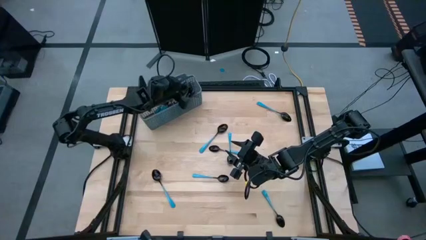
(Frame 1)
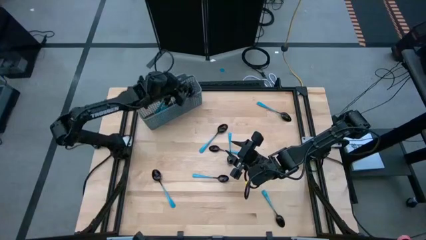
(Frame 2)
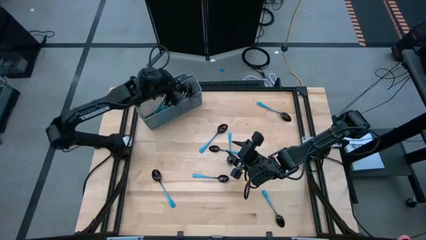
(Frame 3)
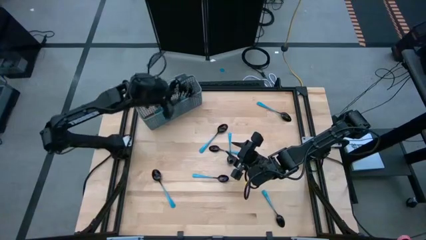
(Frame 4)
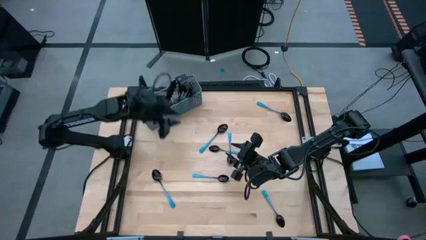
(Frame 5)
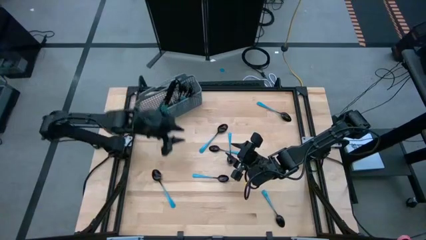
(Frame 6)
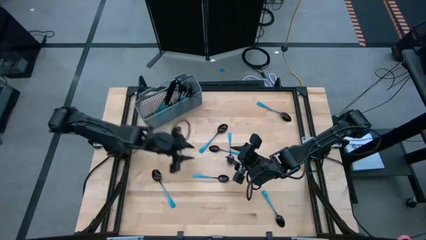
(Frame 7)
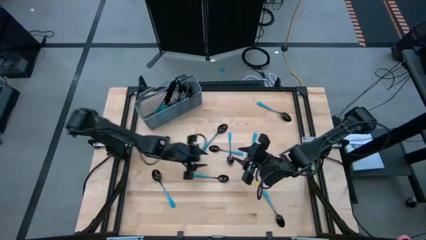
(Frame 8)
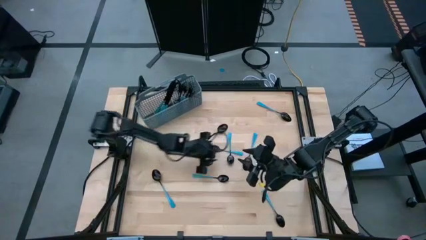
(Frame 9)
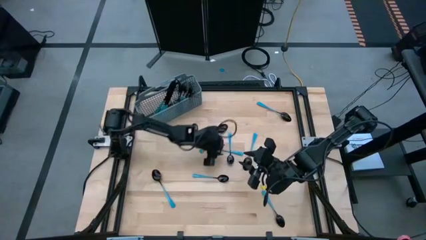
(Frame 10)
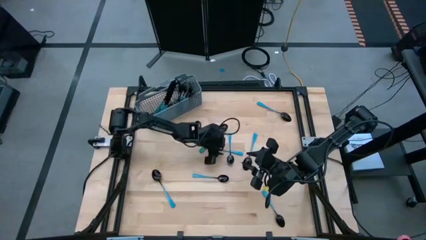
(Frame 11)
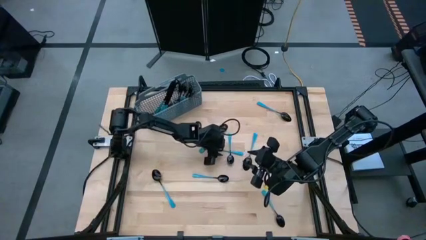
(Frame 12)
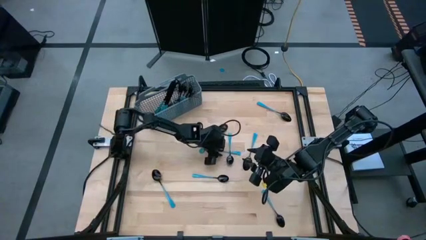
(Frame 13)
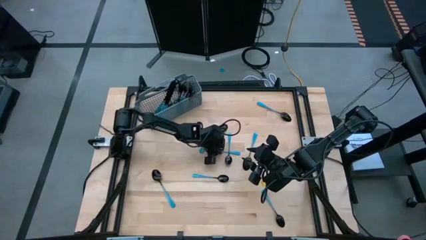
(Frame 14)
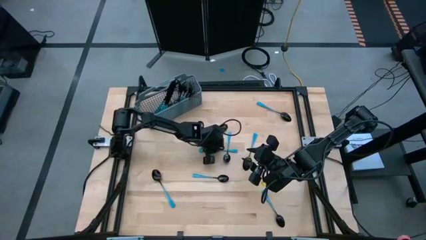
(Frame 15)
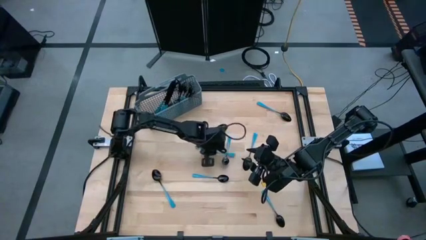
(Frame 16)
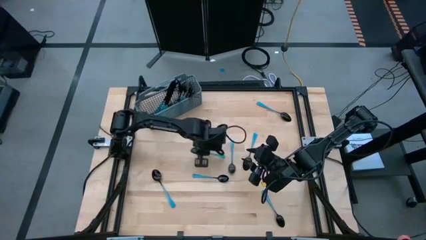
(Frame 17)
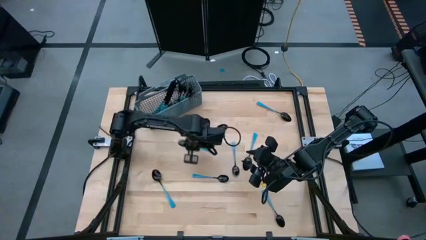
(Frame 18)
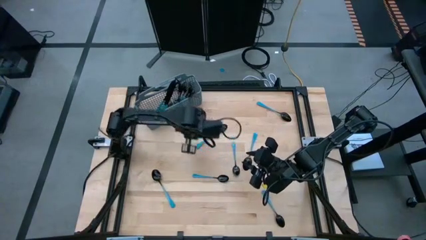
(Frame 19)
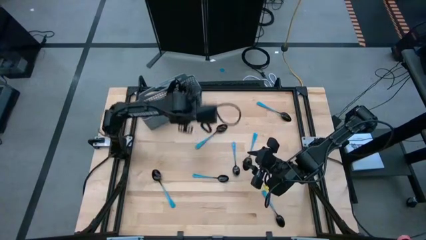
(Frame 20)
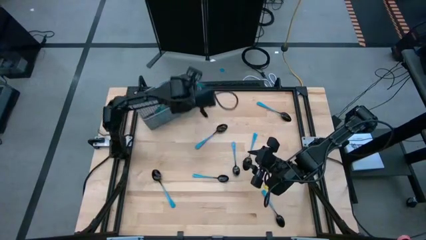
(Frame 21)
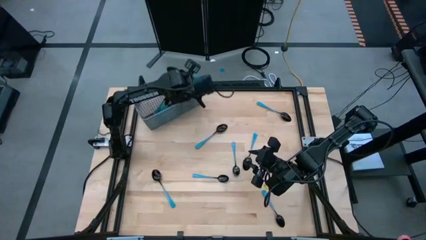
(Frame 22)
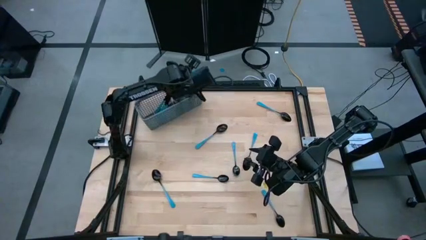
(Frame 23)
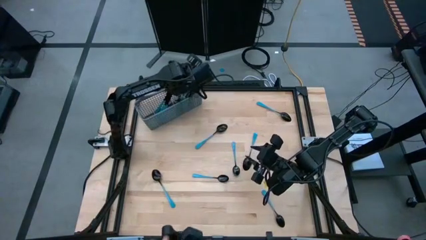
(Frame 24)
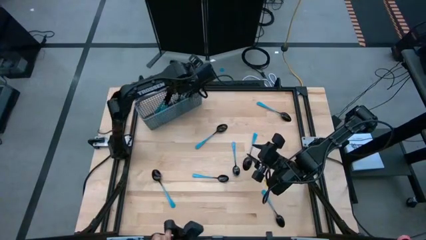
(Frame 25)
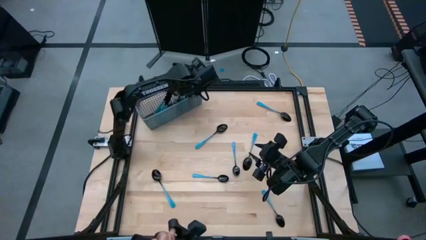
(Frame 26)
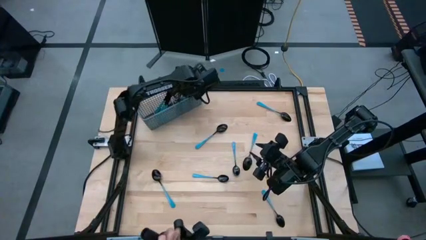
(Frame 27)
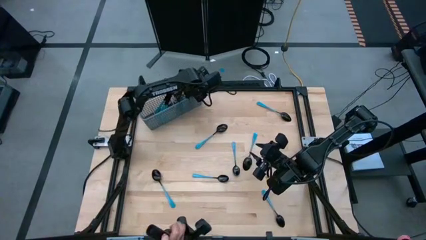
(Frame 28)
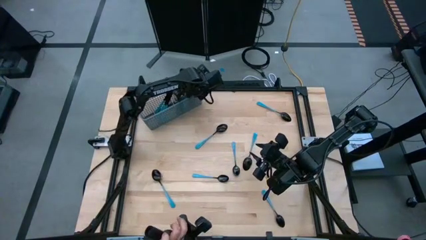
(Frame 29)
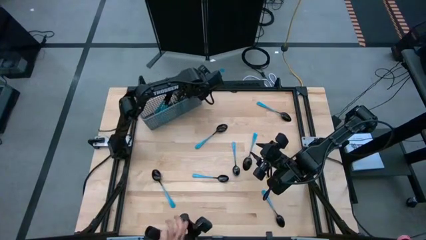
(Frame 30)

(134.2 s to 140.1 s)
Task: Sort silverware
Put the blue spoon in the silverware rack

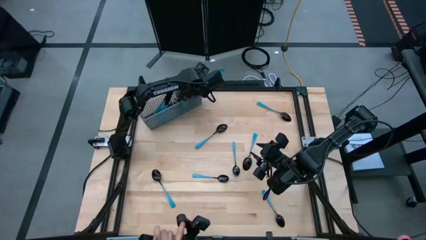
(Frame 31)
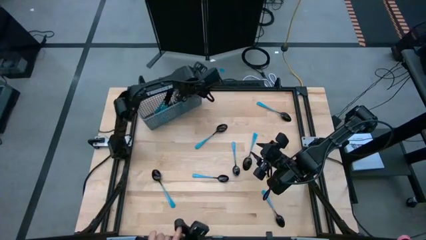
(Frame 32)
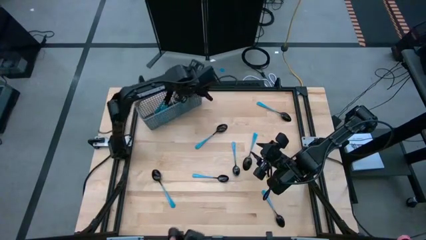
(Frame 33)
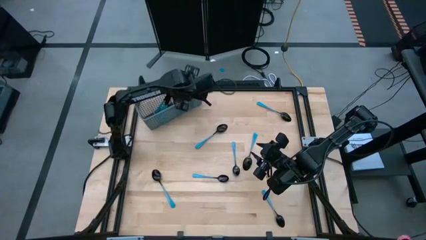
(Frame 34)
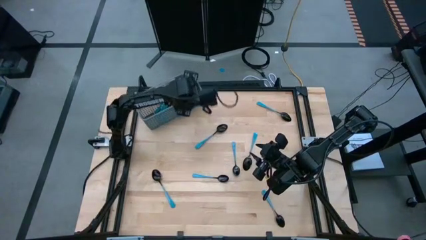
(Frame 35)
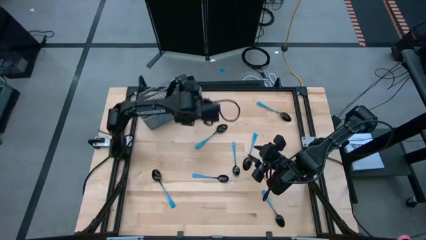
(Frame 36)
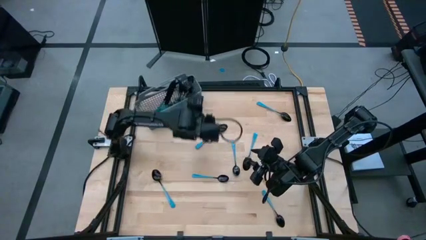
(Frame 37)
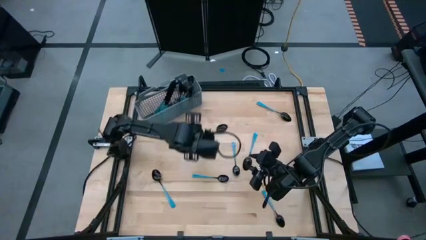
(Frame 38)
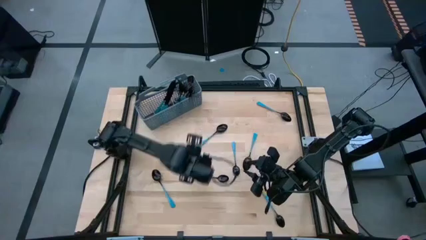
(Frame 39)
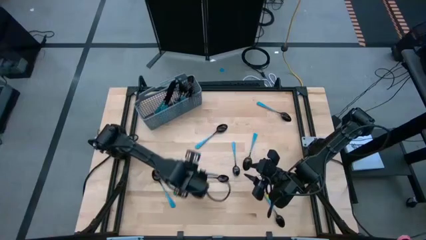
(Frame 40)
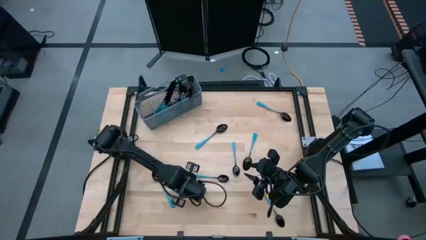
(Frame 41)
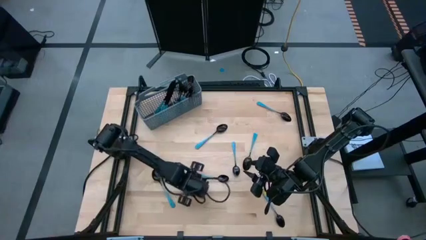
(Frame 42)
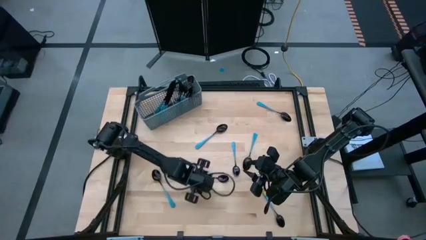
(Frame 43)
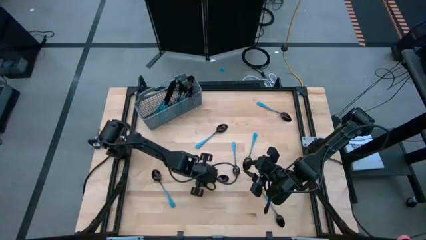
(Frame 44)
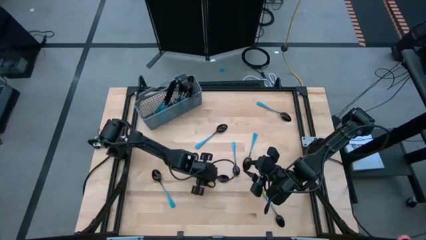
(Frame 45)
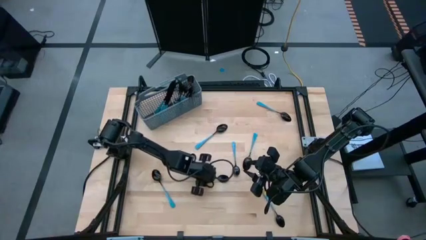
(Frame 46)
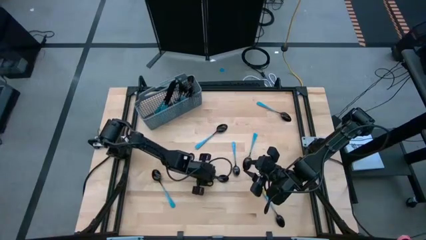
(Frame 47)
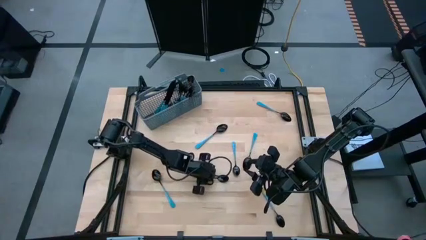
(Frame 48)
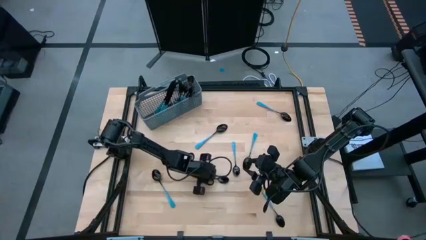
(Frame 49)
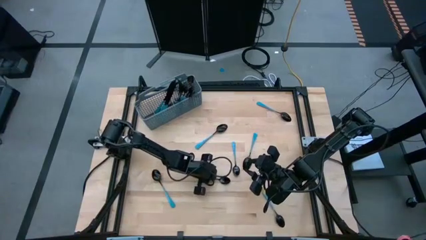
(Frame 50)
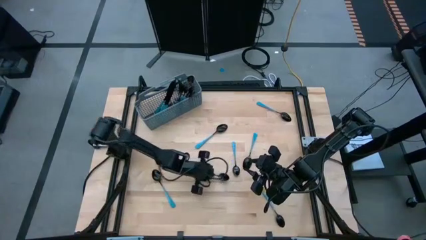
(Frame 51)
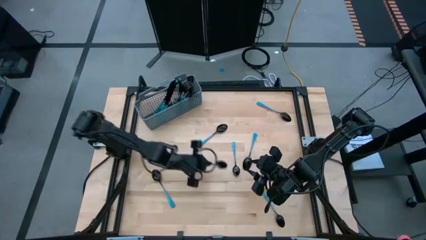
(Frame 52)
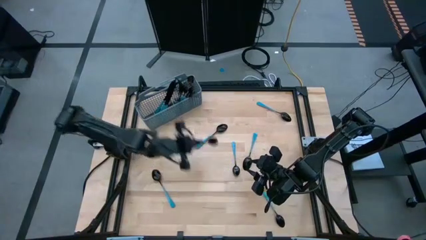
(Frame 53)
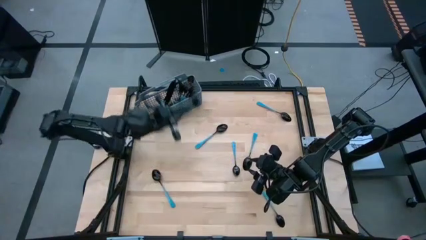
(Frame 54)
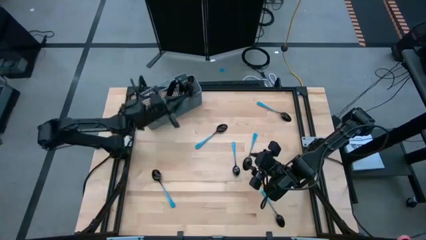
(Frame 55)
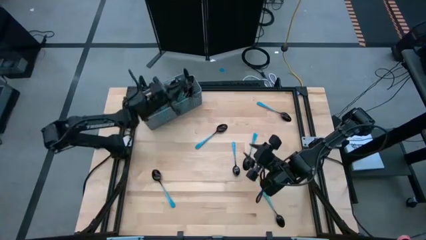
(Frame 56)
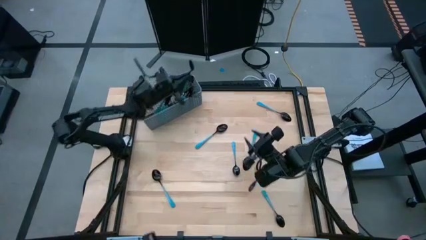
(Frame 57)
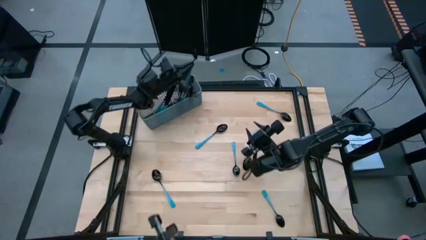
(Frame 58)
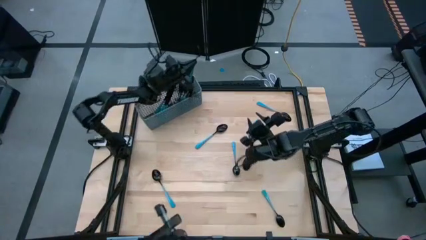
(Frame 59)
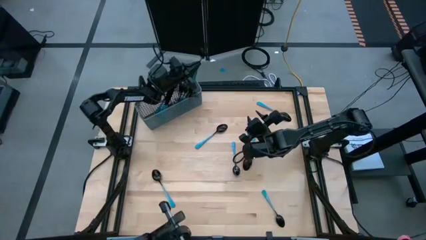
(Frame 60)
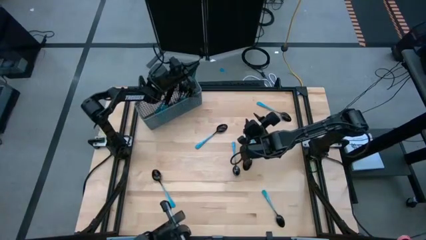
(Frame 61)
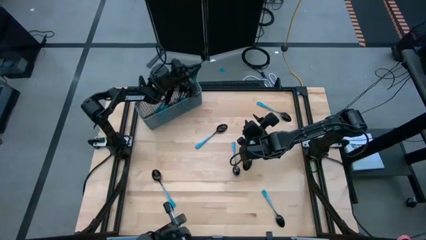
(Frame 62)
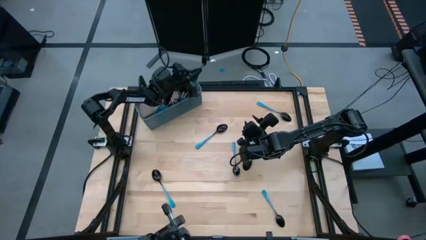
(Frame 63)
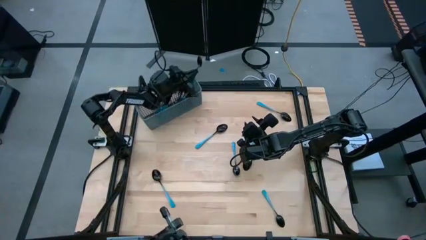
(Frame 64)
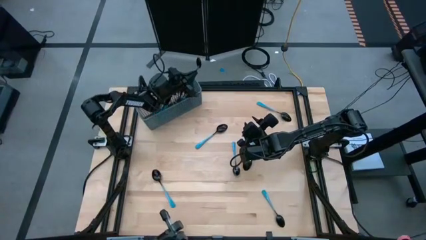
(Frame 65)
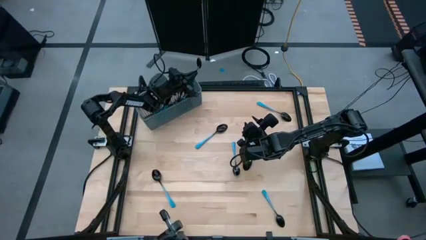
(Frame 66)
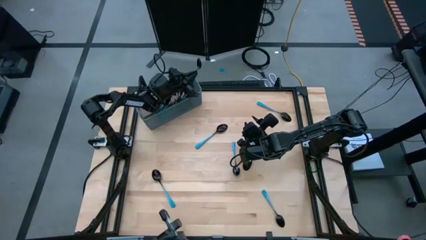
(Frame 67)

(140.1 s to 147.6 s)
Put the blue spoon in the dish rack

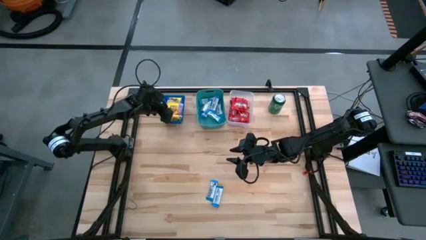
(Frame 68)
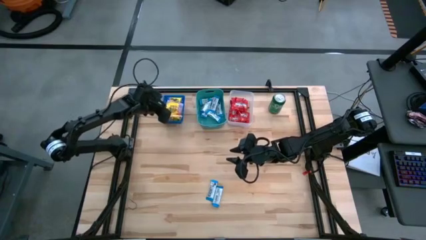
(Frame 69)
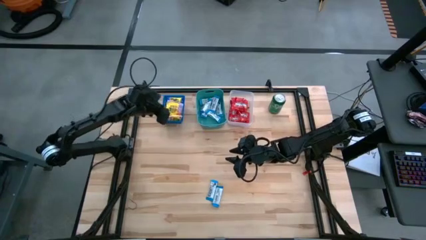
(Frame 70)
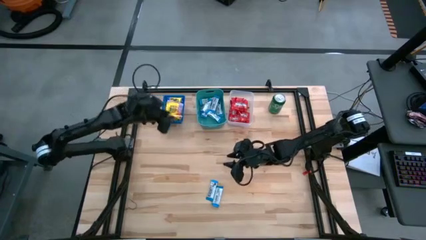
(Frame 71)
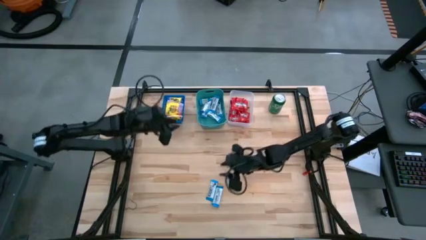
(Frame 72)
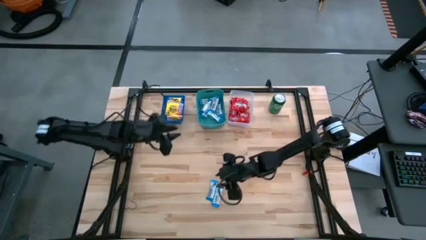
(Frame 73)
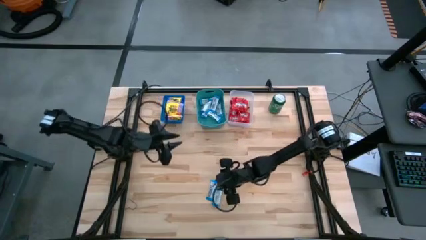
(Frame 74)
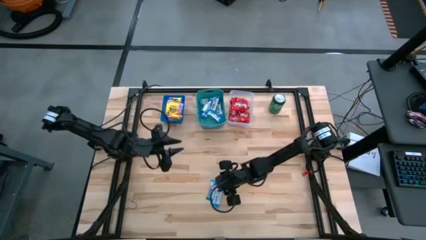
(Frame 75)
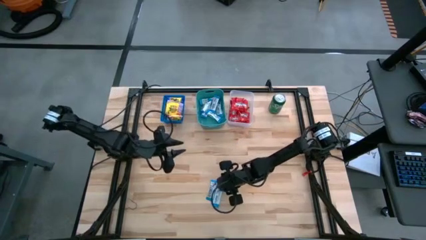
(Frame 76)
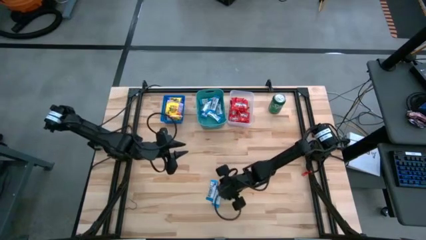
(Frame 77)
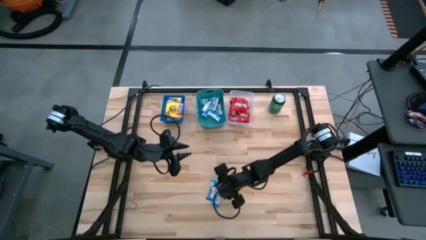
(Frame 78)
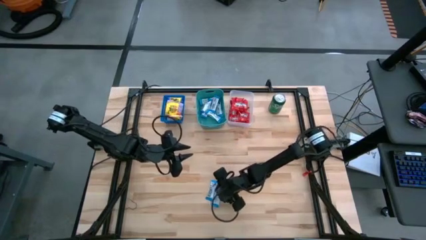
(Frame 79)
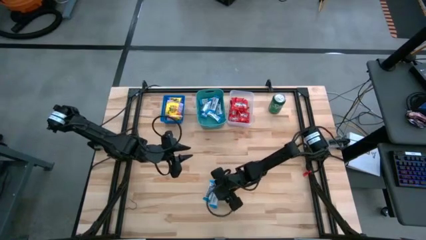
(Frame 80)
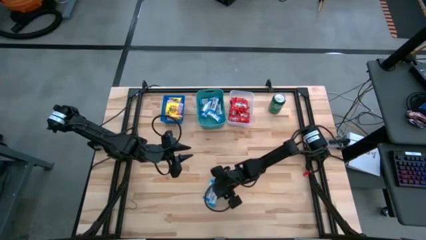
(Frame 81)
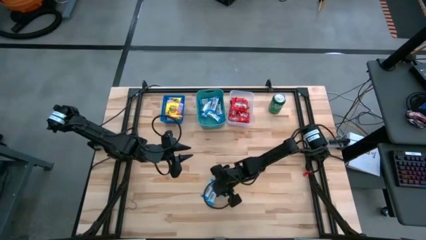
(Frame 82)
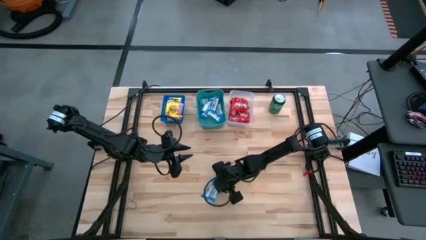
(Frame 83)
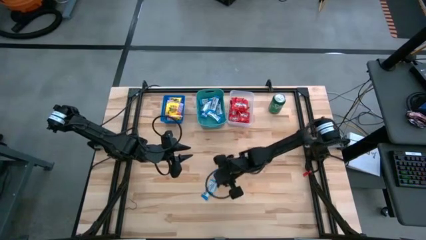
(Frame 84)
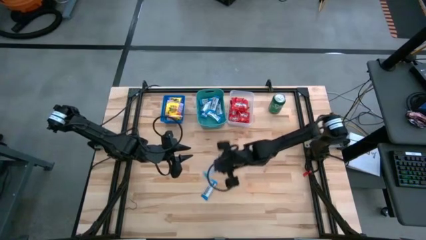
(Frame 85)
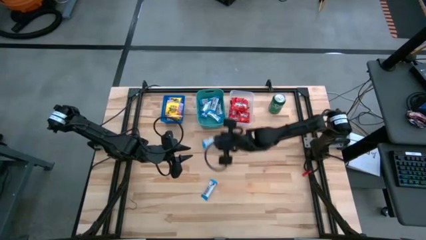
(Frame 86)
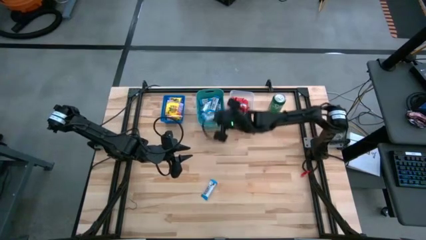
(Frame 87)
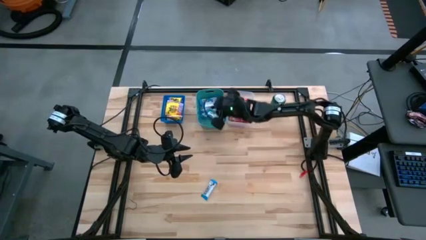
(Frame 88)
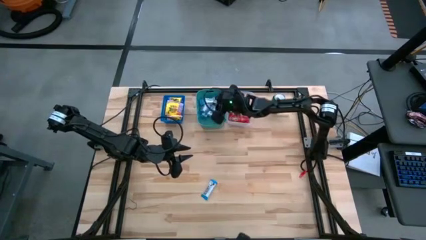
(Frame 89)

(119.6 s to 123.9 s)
Task: Sort candy
Put the white chocolate bar into the green bin
